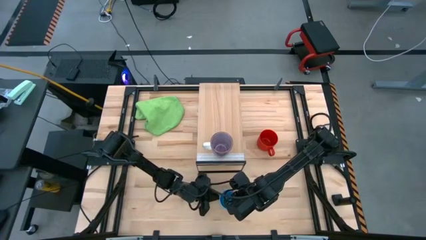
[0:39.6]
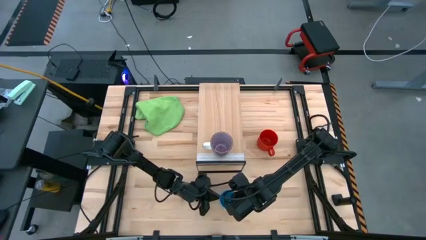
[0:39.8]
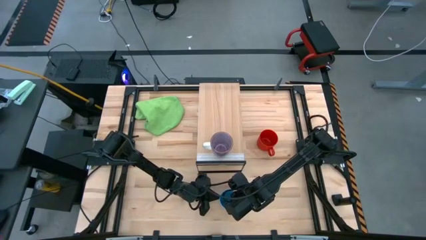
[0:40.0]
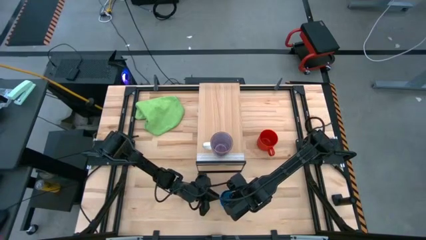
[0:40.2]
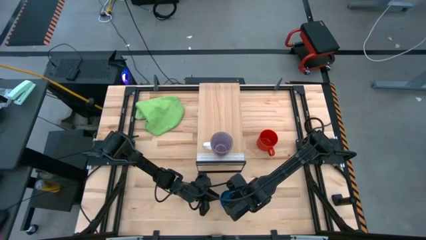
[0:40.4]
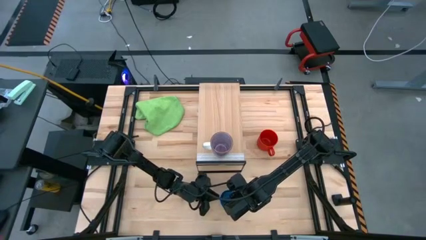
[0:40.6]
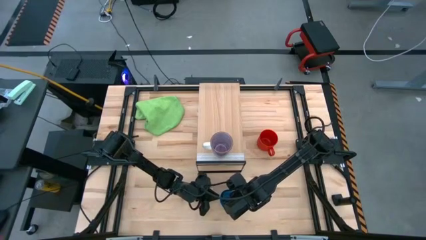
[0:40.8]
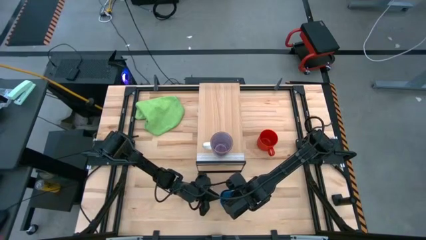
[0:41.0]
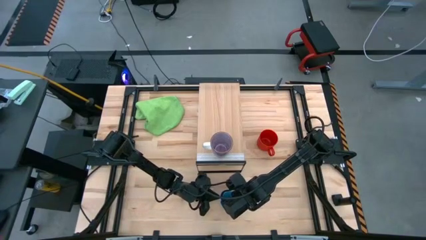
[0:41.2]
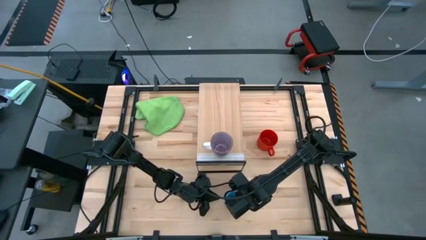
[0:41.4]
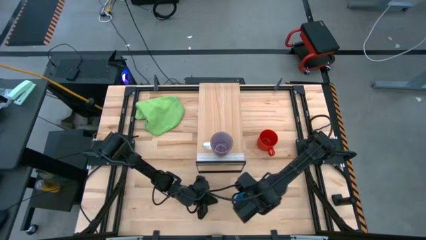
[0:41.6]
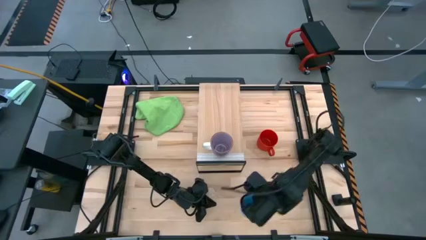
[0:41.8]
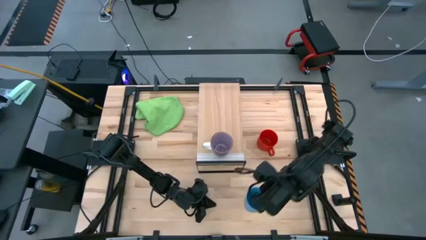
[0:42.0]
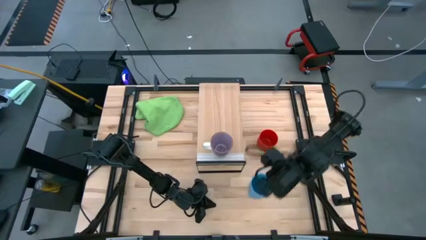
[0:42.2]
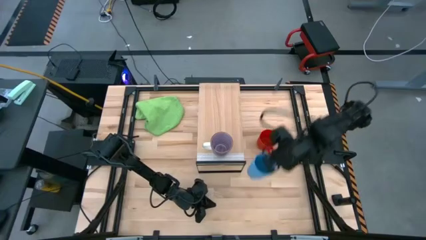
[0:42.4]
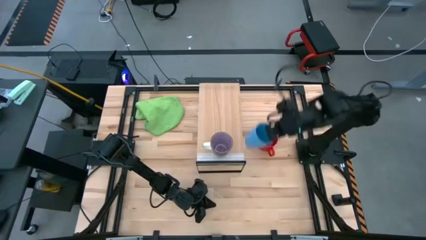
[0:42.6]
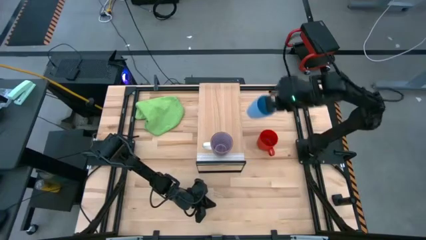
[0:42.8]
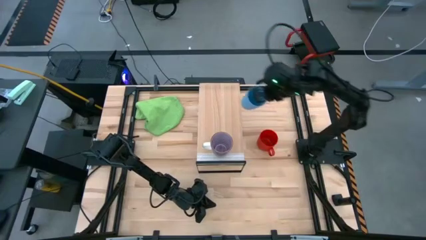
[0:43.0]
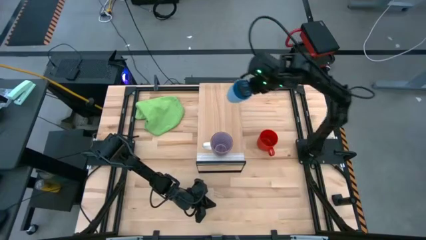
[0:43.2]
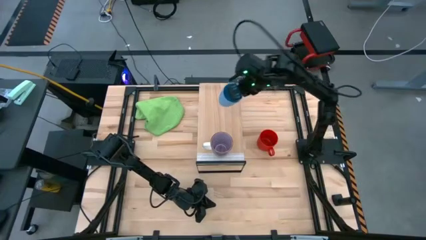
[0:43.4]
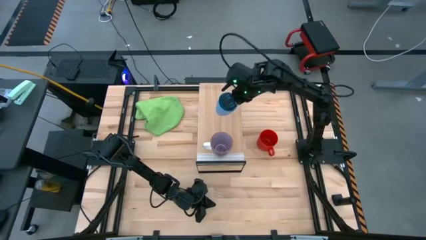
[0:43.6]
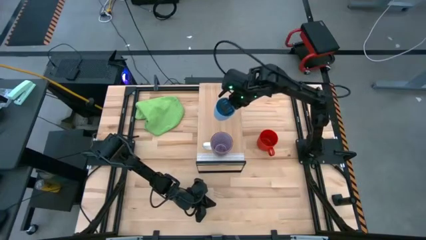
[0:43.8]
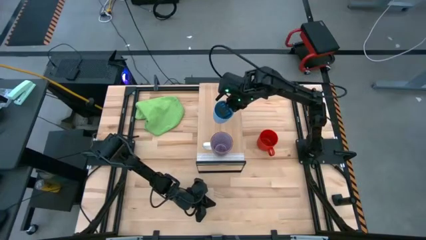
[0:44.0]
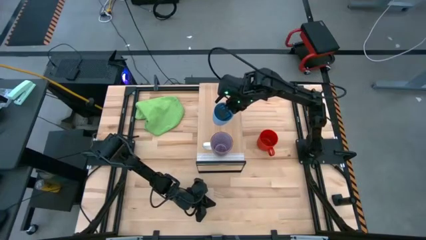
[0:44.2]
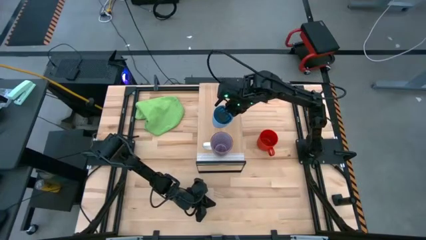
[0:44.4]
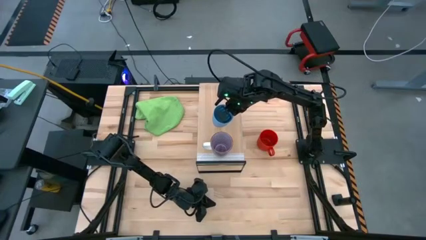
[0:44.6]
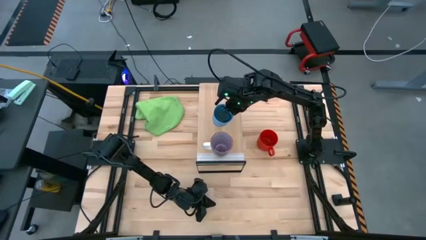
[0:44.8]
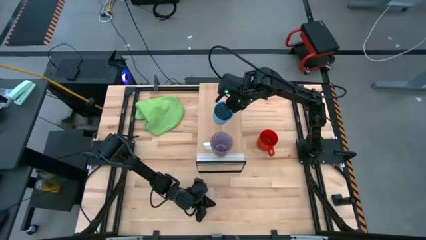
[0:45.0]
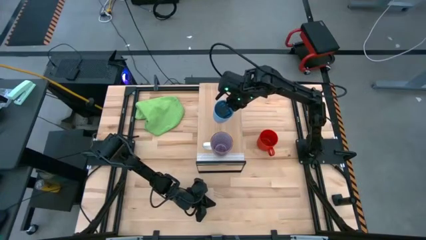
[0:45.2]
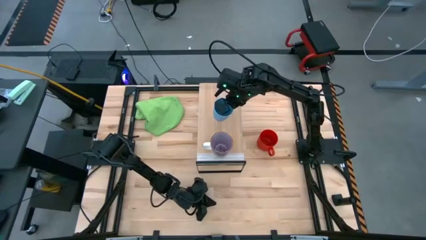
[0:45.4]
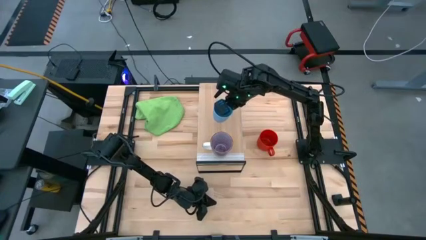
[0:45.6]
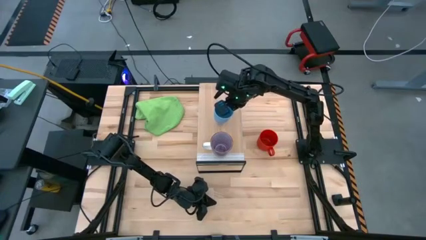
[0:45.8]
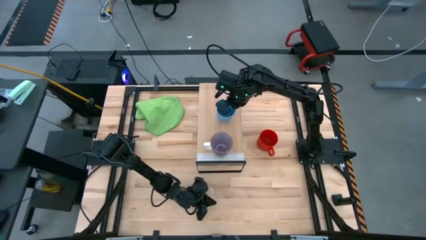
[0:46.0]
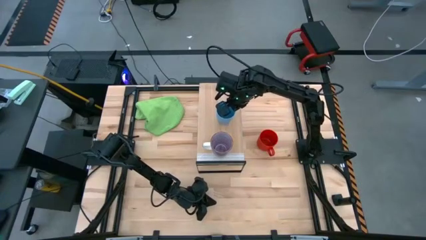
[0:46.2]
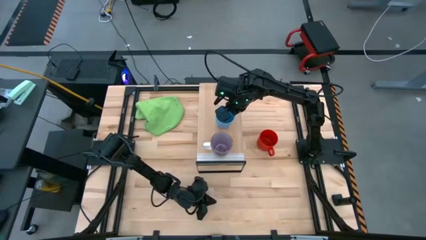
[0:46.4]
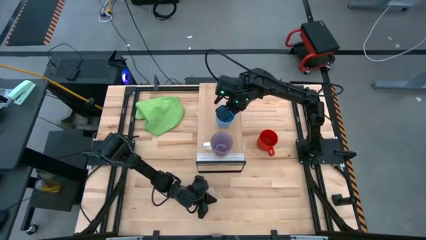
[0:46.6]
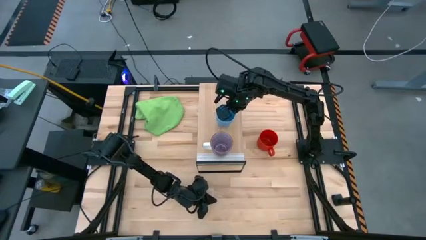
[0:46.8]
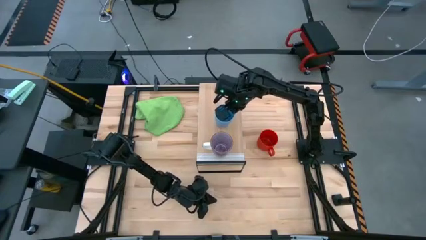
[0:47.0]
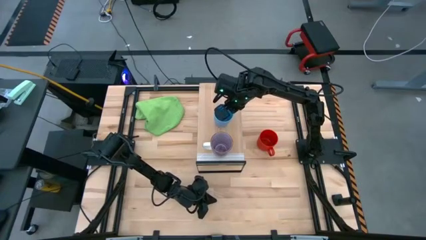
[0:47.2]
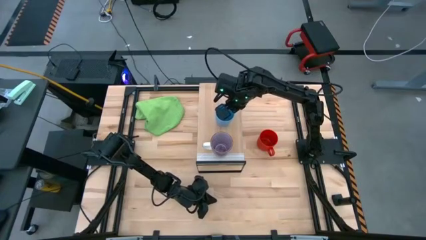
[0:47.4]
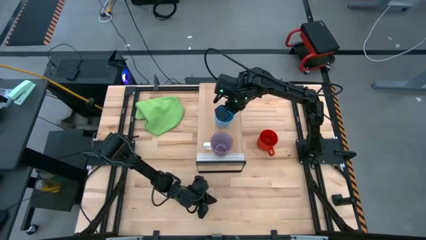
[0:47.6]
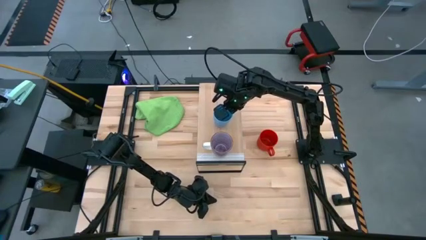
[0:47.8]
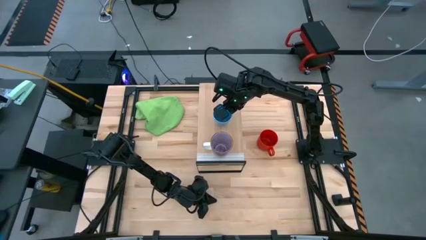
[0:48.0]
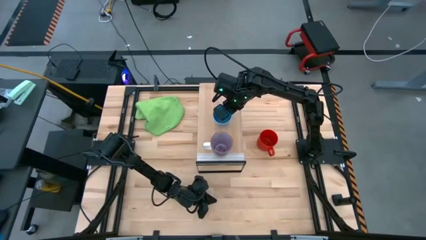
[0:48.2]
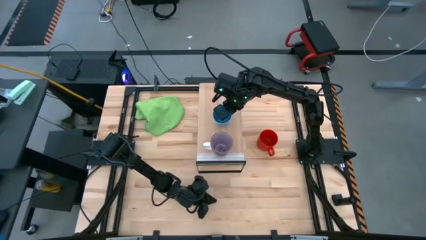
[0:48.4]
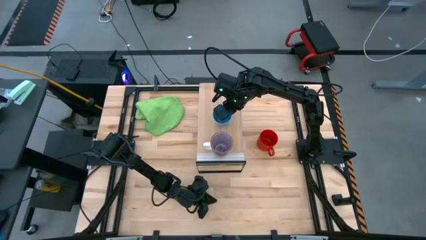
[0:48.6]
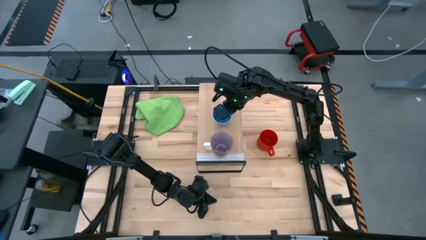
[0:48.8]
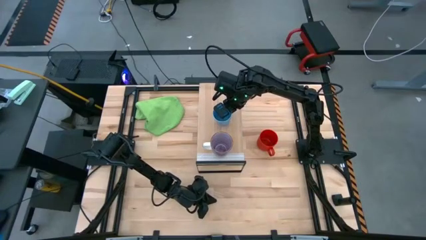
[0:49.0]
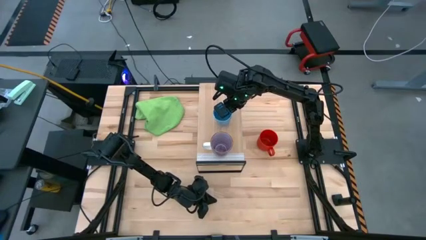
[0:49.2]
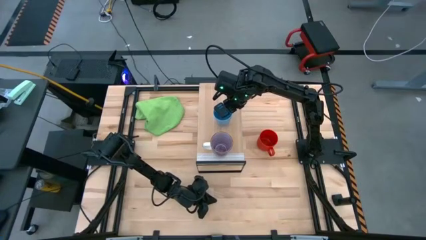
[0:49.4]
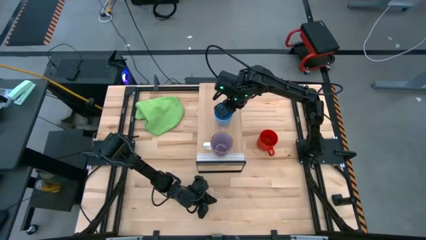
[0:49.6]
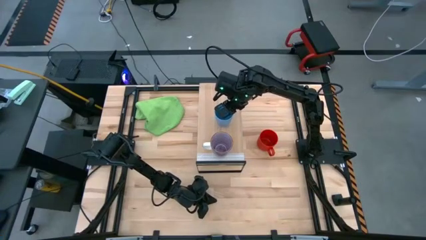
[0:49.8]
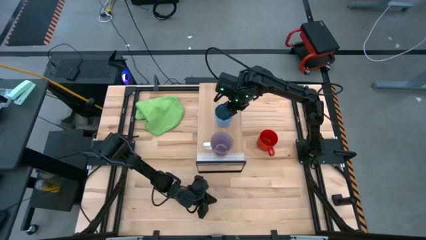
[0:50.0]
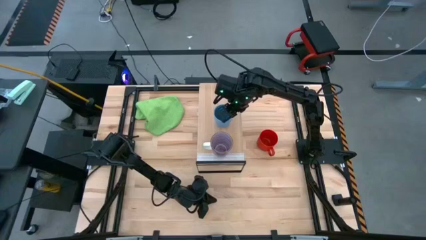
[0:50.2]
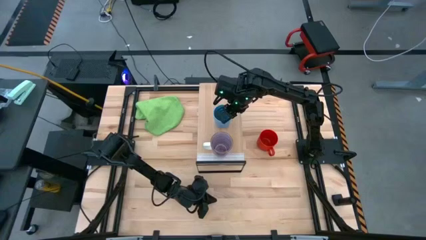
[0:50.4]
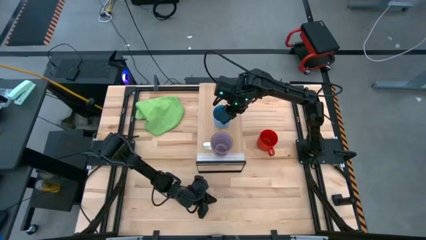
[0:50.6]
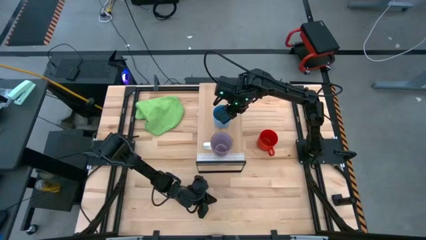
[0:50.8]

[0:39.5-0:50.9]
Task: Stack small to large cups/mugs on shelf
Put the blue cup on the shelf
